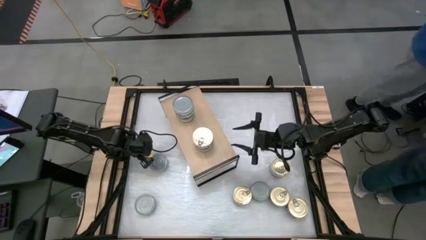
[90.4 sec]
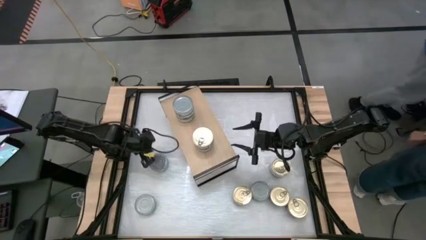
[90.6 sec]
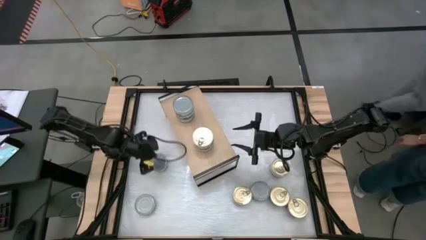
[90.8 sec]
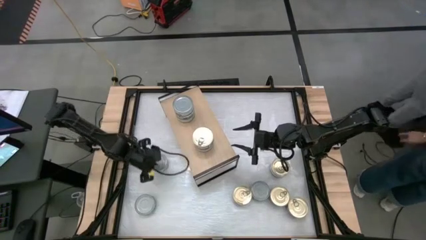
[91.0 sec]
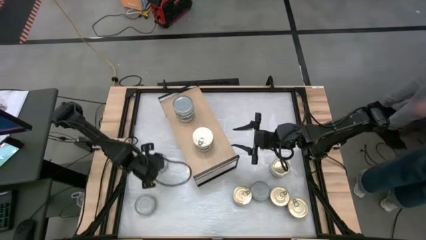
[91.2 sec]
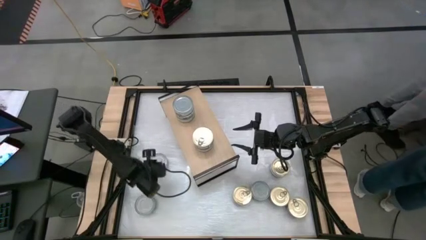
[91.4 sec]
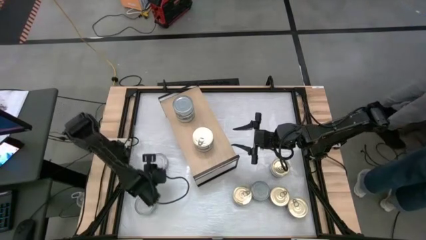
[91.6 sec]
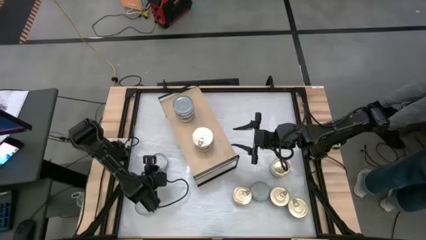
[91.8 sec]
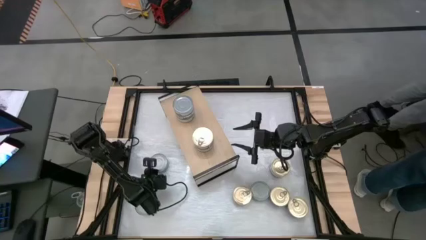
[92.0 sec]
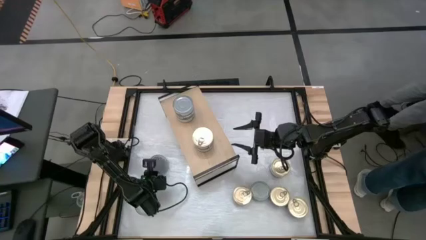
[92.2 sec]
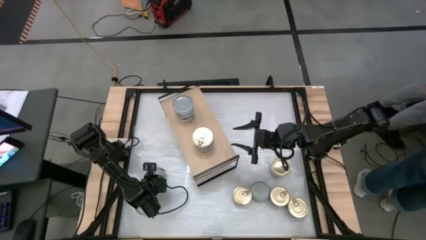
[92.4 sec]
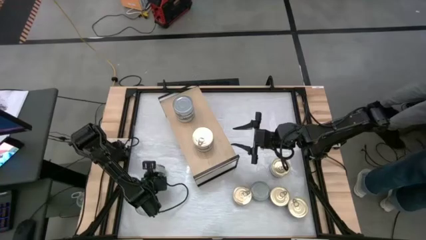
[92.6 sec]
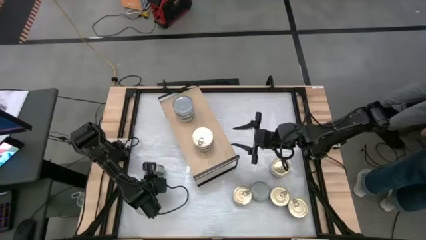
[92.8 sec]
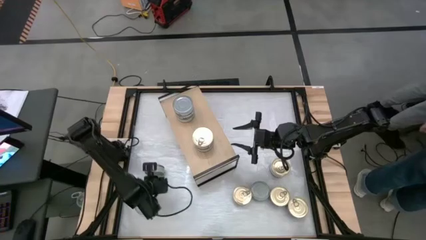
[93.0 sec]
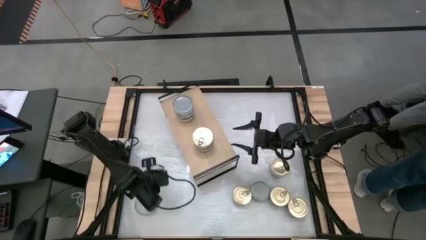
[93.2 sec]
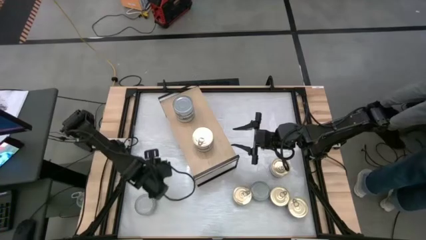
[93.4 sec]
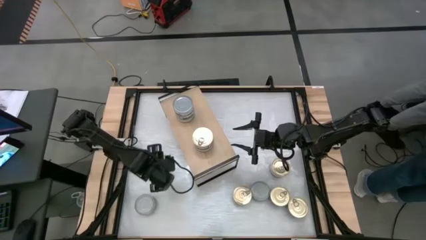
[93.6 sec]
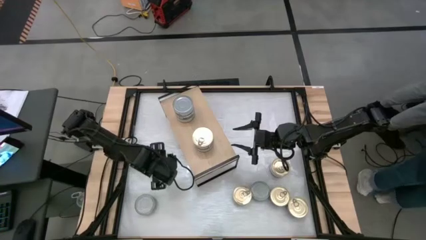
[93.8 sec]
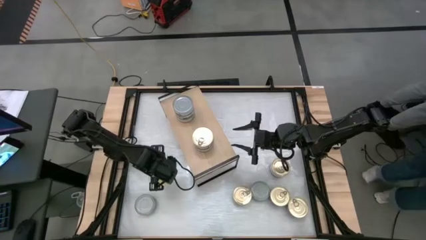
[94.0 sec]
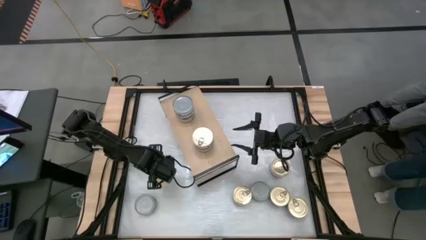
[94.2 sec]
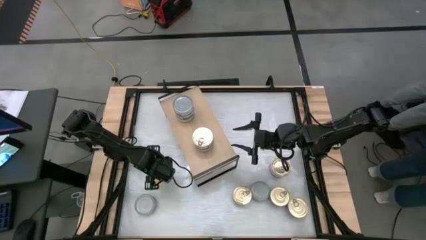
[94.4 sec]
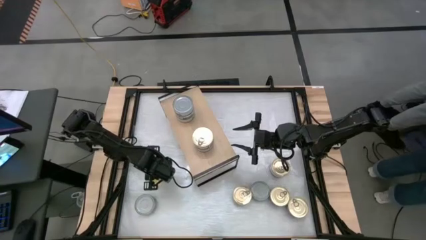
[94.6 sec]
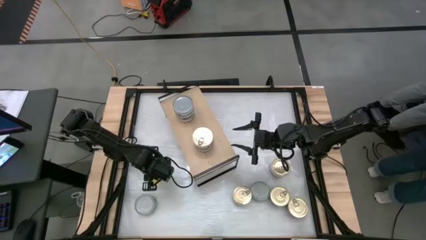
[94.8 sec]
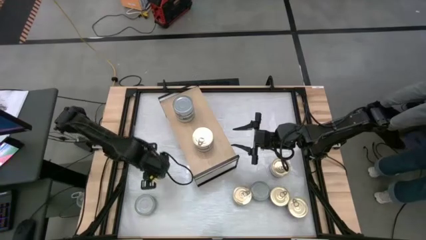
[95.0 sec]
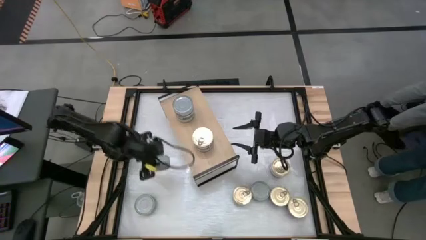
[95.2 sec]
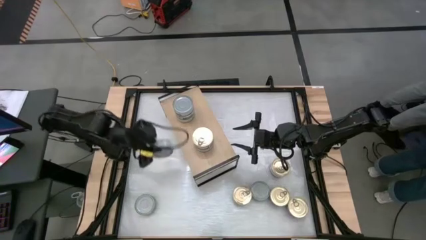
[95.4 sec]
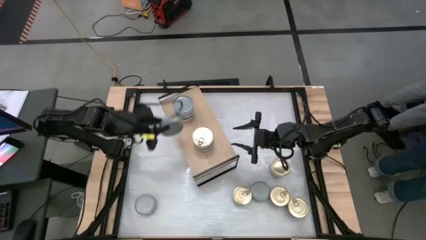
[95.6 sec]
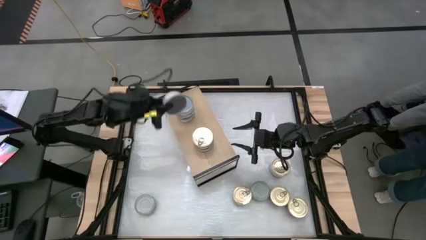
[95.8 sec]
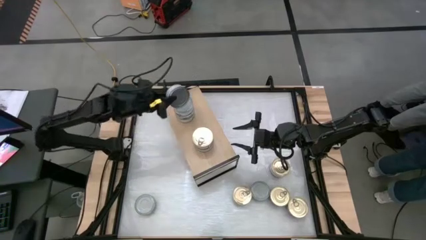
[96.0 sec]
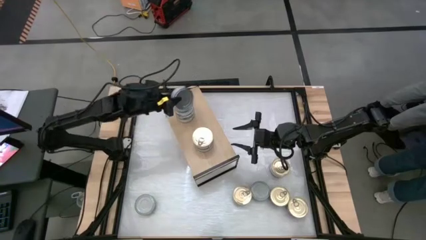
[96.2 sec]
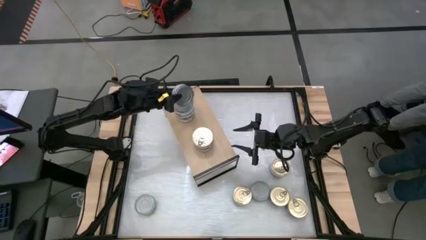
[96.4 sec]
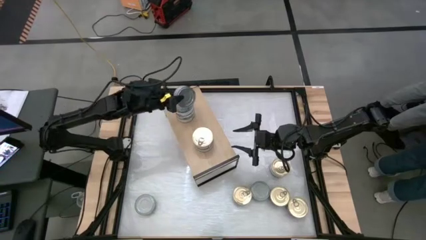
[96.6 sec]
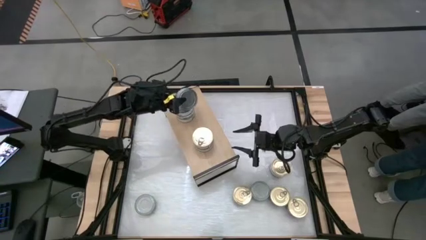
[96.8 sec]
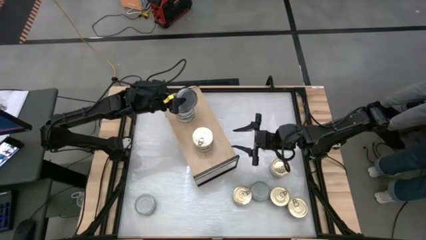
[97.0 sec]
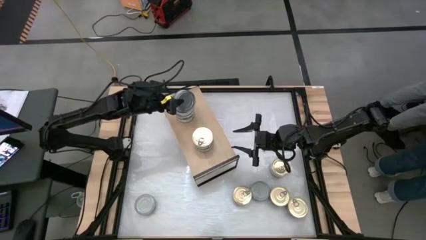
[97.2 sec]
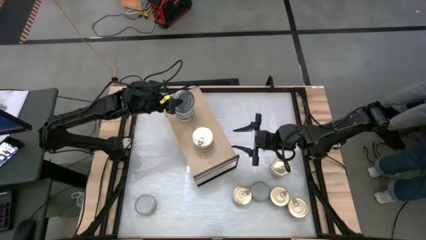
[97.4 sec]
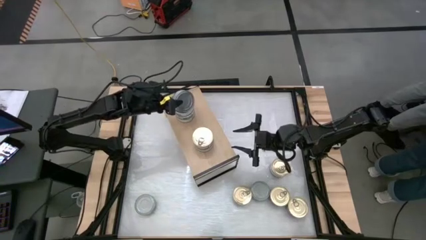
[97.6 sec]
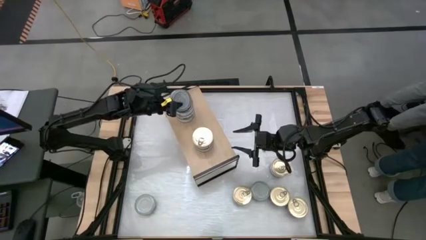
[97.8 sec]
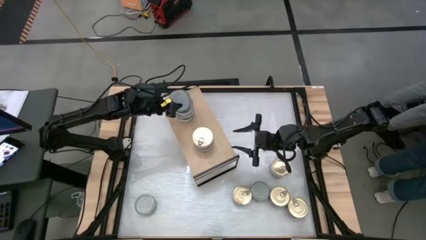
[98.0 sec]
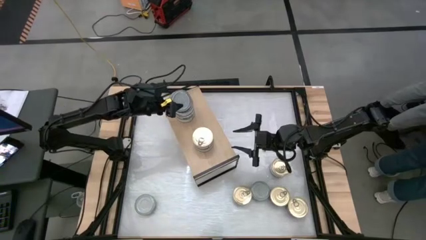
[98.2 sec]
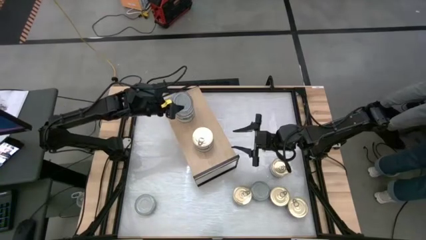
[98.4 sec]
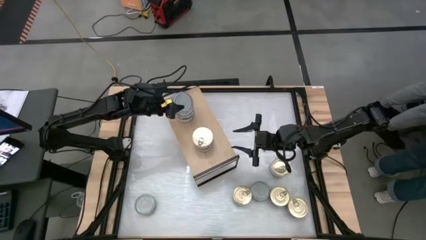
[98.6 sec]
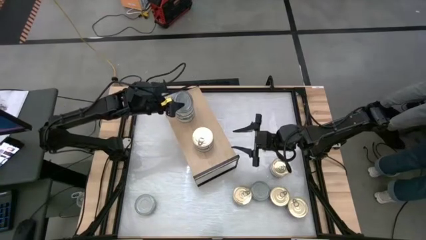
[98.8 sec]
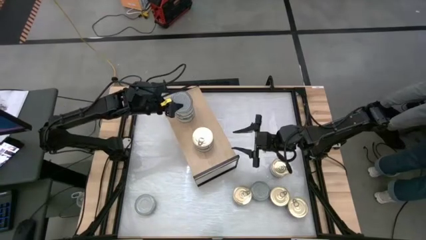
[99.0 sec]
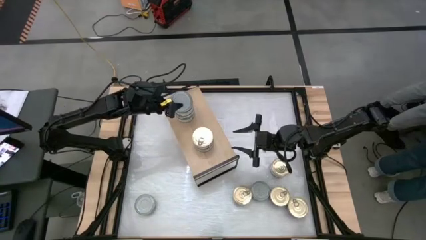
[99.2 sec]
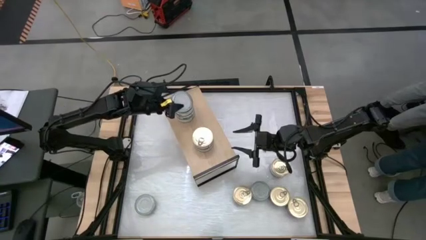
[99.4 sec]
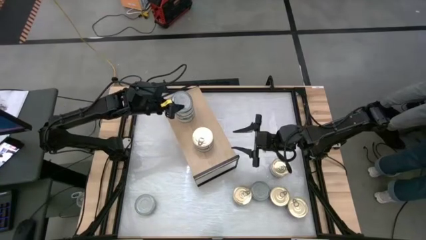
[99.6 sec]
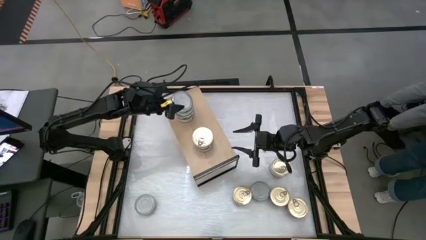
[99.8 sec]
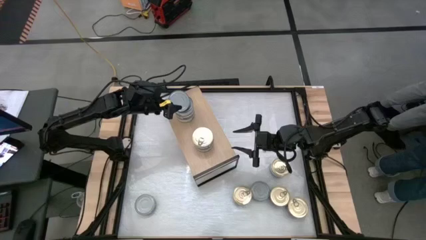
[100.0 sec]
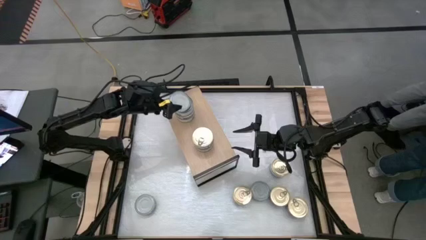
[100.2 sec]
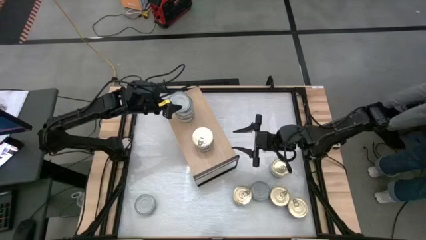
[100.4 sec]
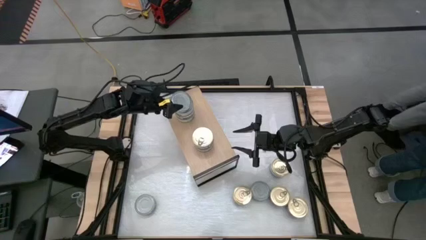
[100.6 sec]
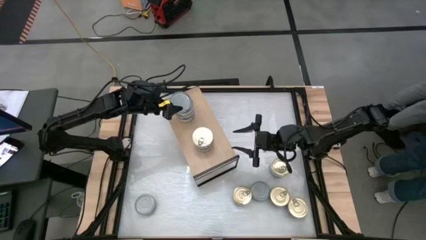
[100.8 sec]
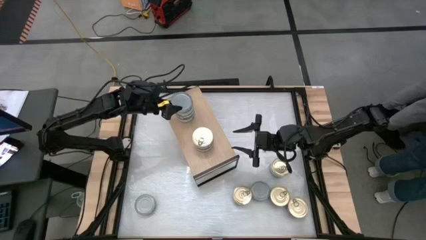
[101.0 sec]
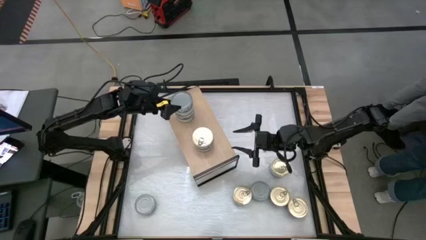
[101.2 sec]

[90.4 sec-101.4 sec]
Task: Stack canned seafood by type on shelf
Stack the green tuna can on top of the other green tuna can on the shelf
